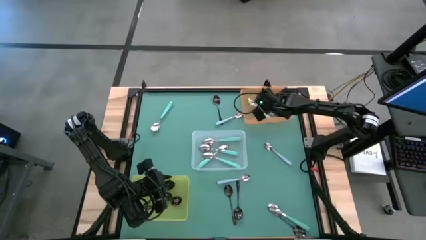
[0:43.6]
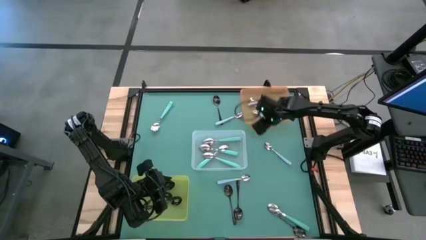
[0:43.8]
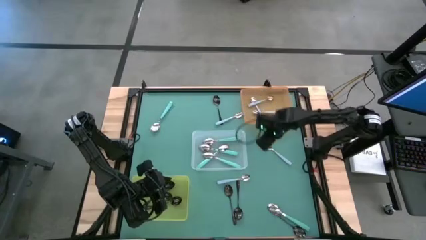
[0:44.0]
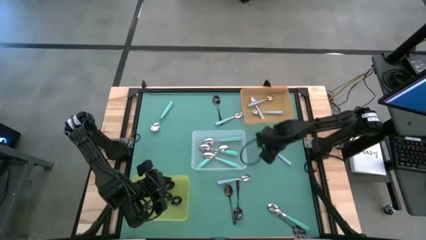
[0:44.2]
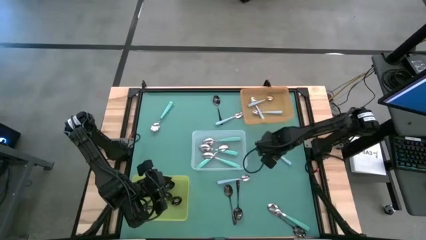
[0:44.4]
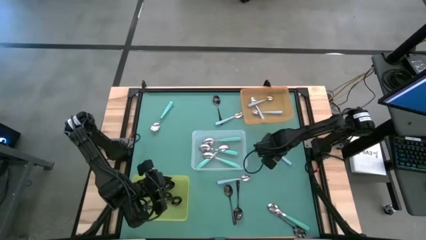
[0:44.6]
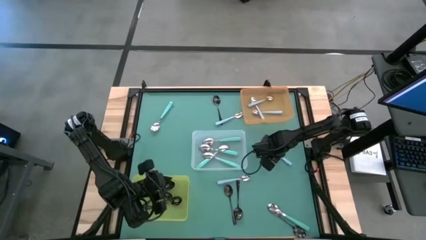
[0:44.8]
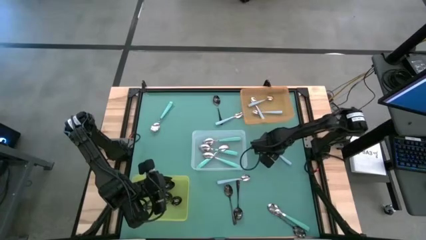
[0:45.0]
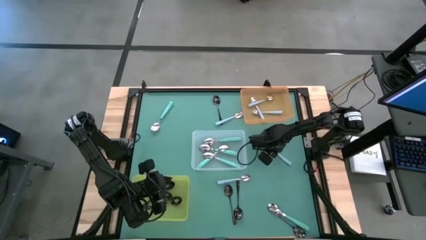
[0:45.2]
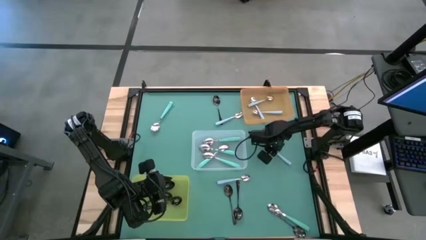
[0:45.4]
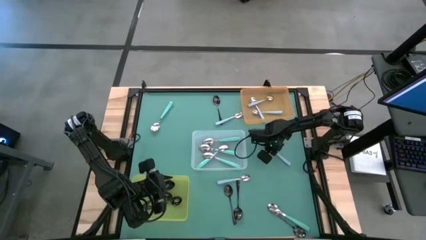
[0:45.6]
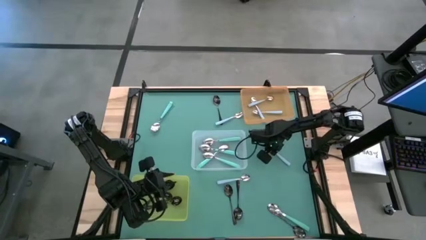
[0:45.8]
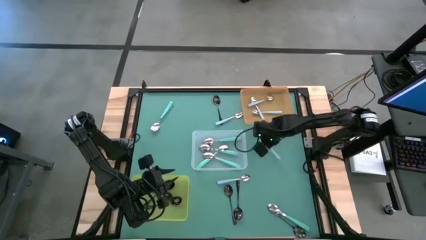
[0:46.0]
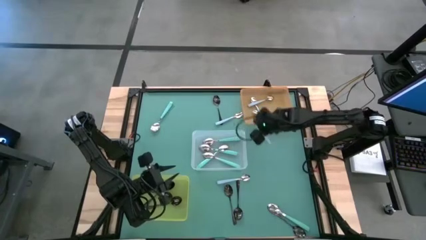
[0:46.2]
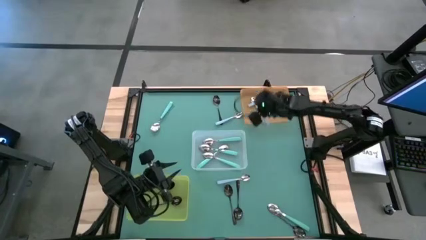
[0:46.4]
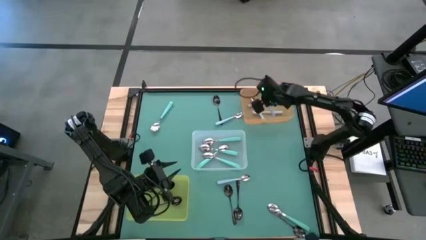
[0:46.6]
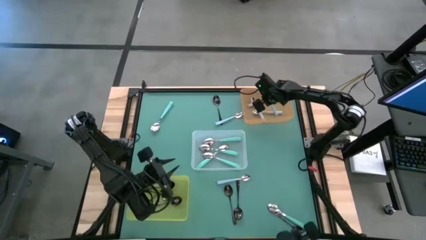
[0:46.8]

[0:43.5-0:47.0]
Task: Sort silverware by color (type)
Put the purple spoon into the orange bin

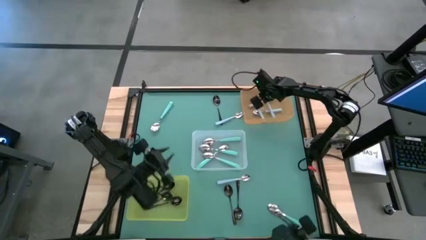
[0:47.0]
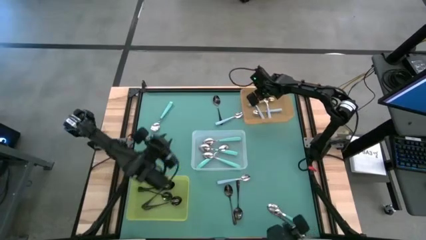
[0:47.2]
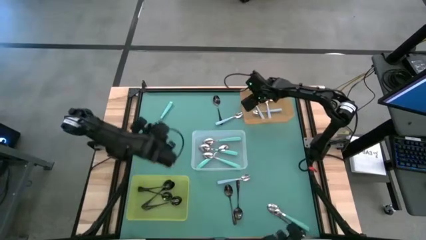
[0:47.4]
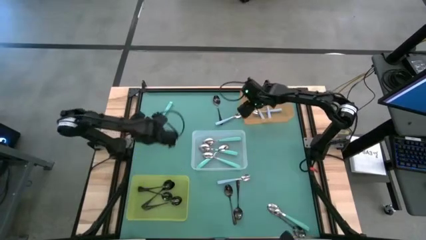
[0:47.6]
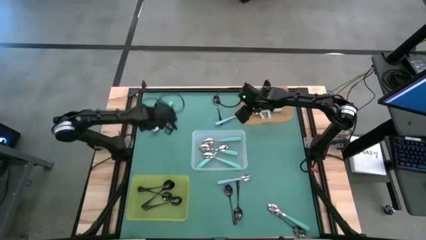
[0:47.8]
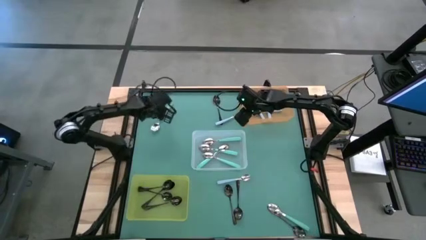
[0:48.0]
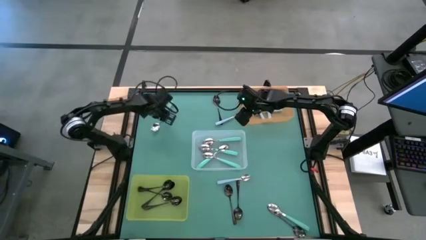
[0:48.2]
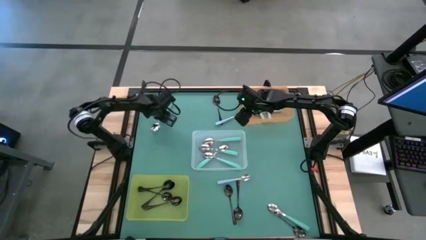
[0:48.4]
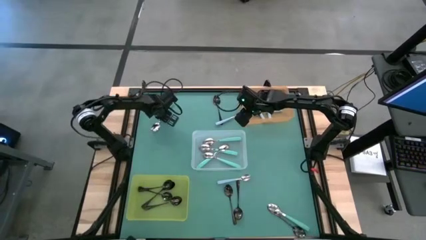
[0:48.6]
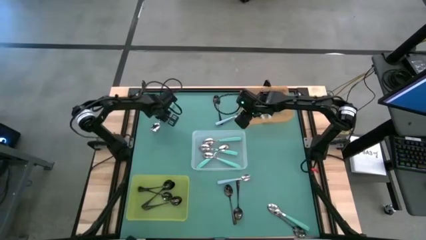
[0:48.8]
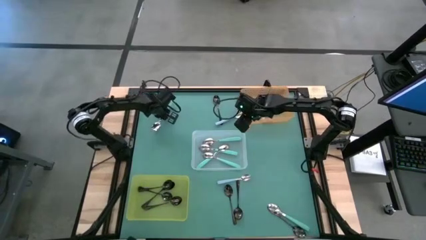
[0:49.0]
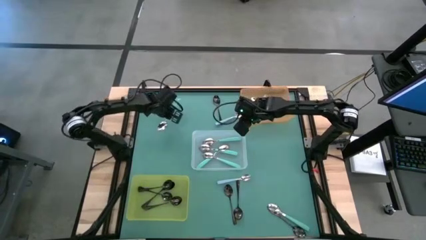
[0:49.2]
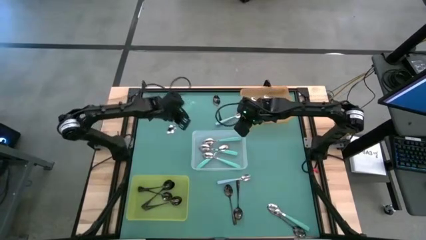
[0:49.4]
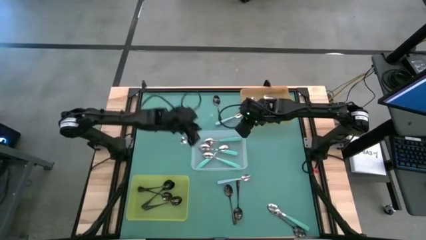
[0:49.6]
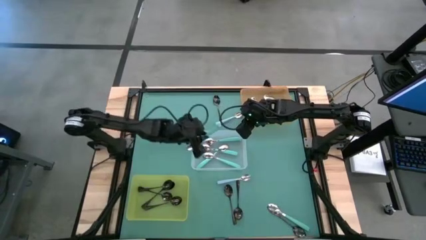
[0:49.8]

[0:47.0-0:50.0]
Put the green spoon into the transparent bin

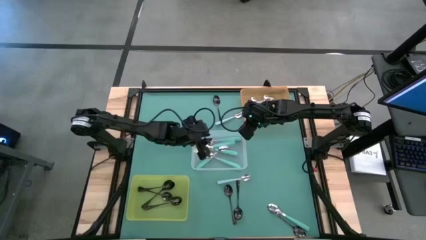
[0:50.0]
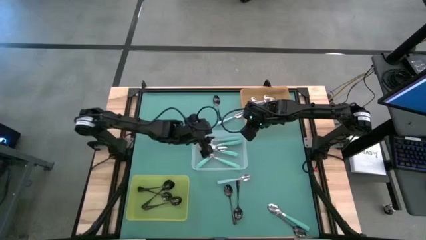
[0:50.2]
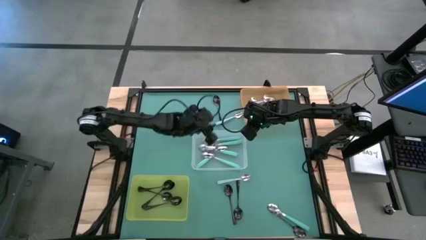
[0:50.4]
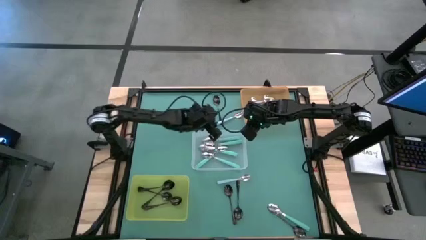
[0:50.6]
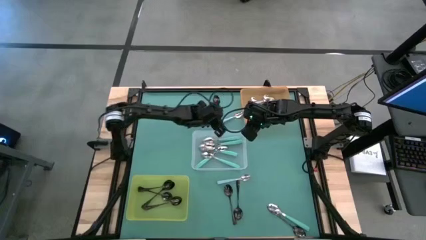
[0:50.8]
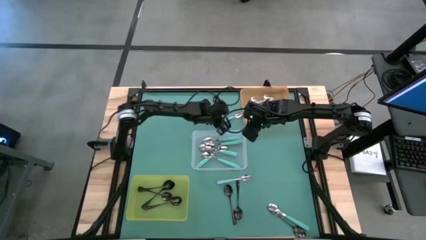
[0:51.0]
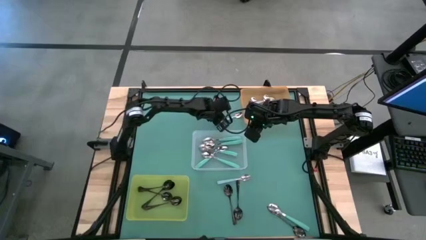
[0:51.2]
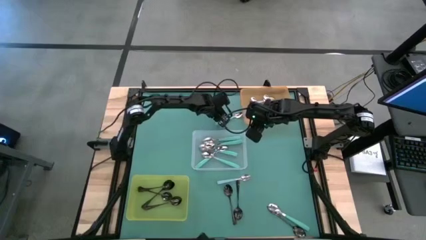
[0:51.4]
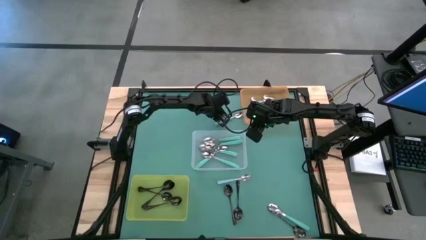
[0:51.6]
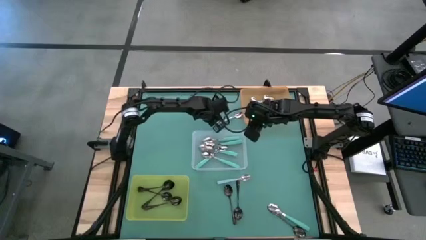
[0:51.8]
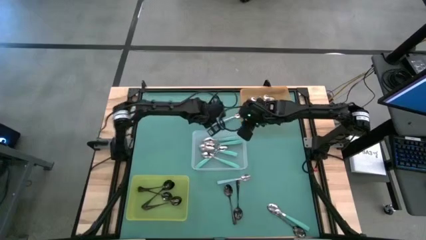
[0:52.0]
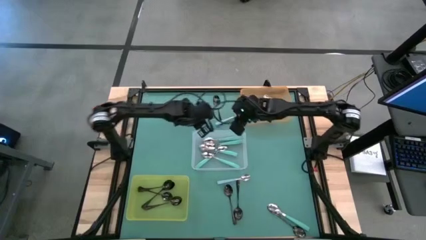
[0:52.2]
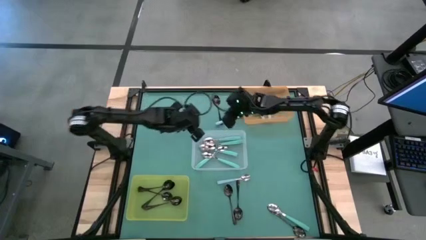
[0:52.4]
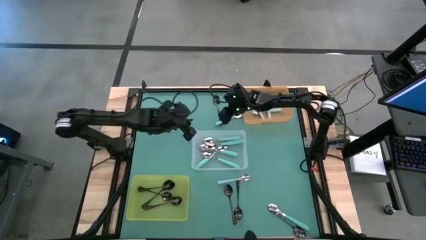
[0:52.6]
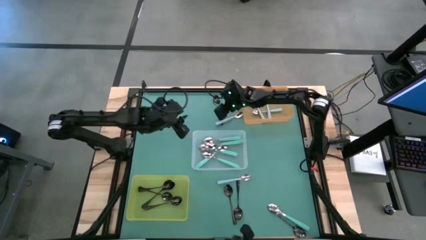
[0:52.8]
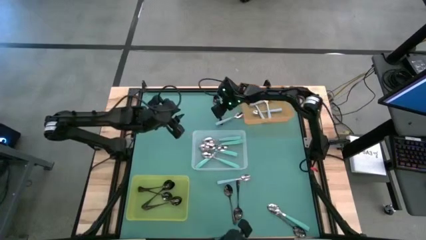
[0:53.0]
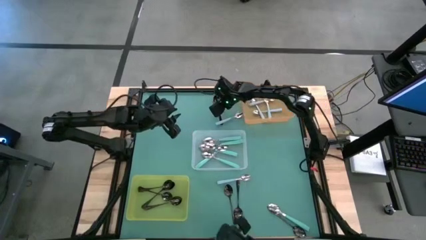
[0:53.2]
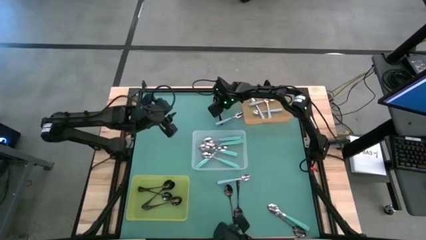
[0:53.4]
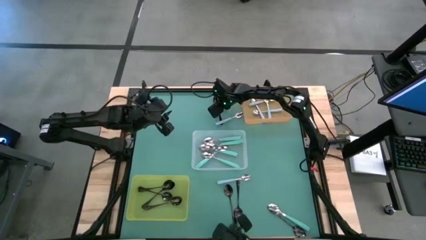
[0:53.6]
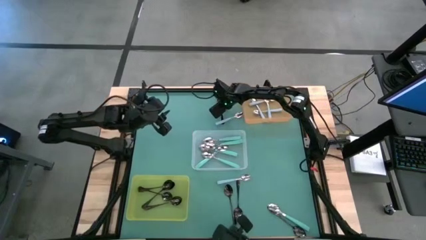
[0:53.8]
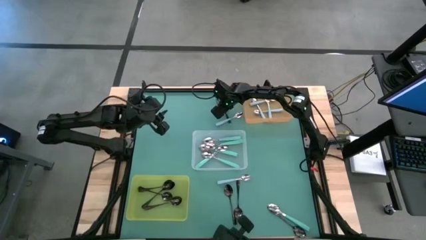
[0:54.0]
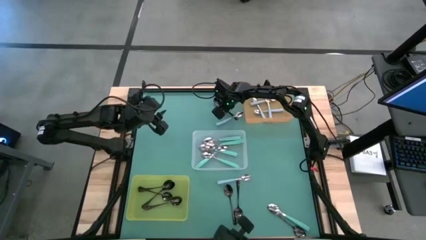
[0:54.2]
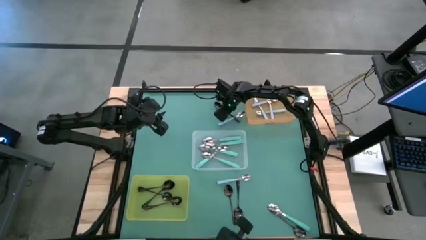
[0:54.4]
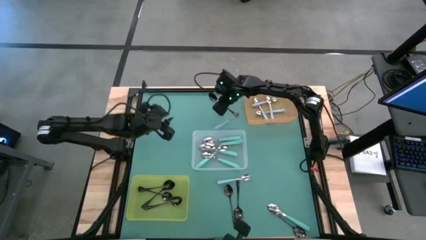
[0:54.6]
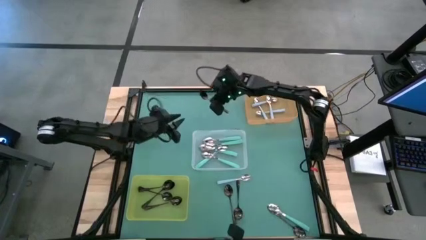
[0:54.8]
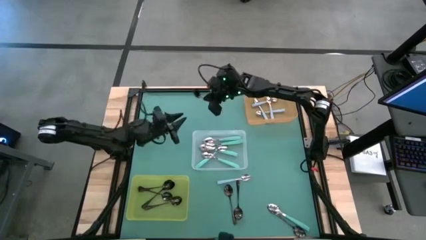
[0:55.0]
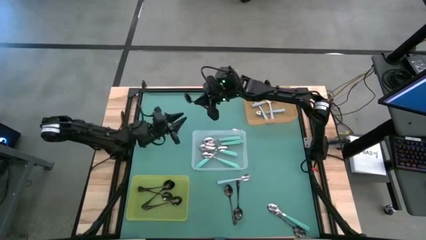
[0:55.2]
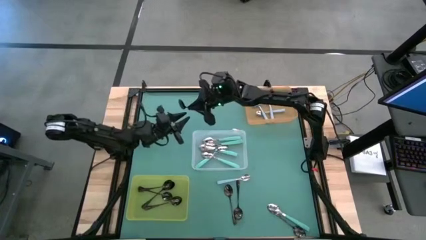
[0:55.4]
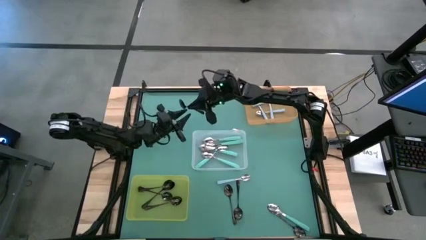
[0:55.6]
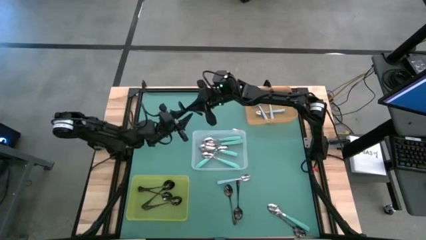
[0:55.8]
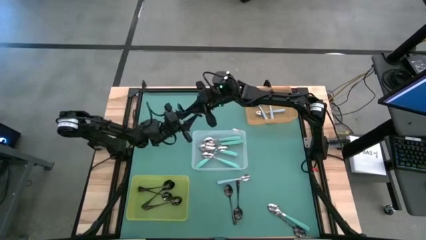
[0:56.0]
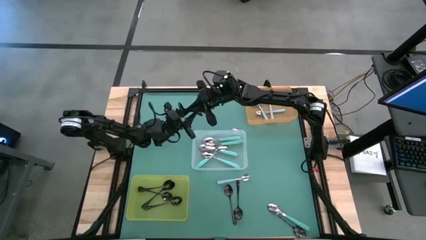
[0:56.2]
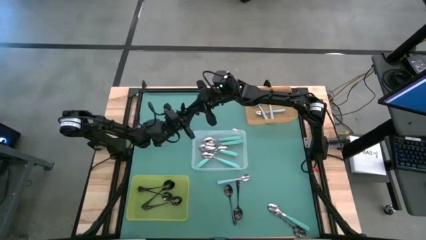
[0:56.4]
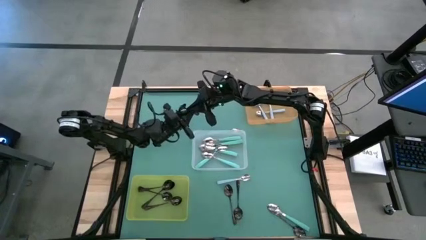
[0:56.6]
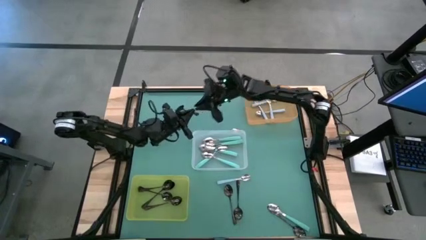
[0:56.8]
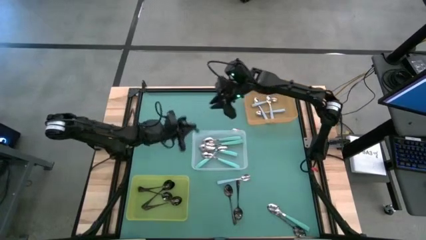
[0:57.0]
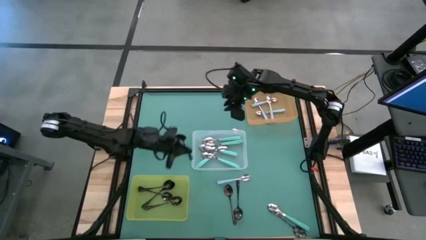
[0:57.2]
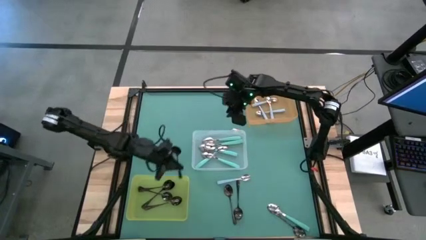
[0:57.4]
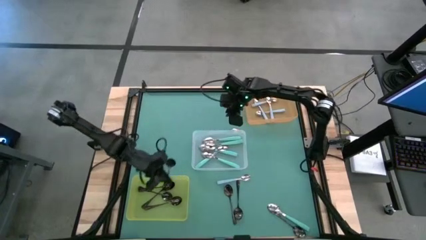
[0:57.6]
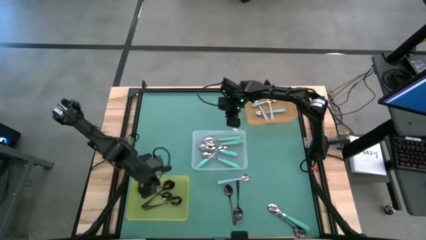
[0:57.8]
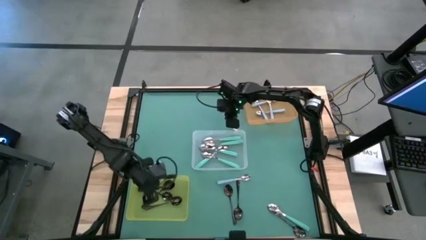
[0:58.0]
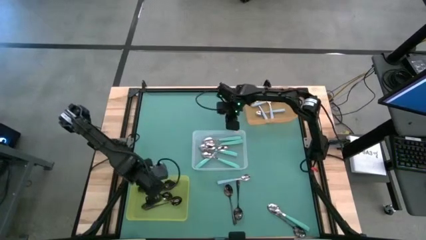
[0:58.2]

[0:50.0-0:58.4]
Put the black spoon into the yellow bin

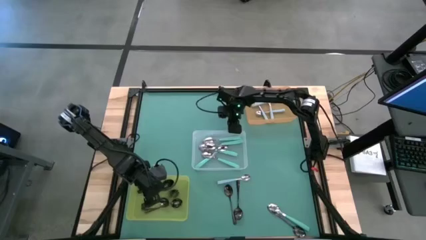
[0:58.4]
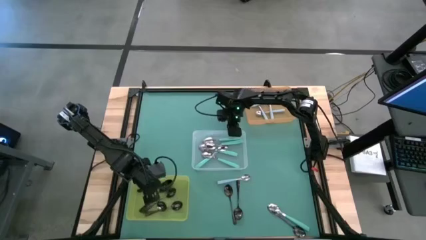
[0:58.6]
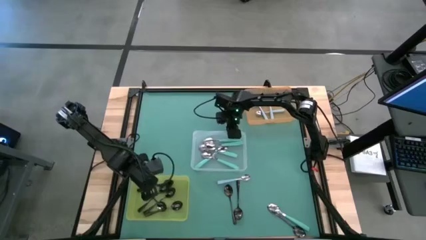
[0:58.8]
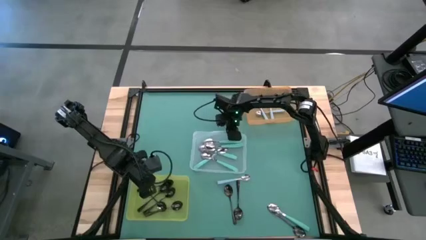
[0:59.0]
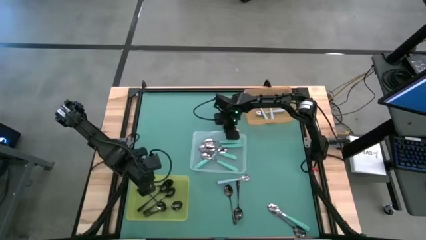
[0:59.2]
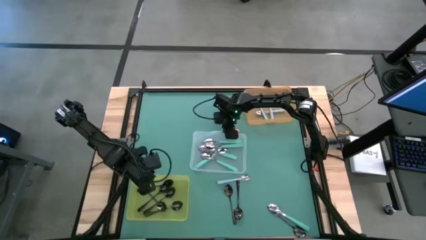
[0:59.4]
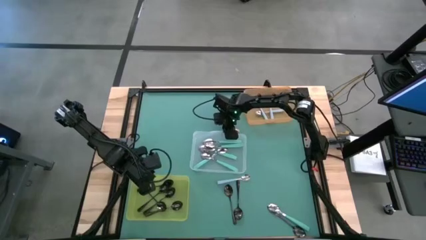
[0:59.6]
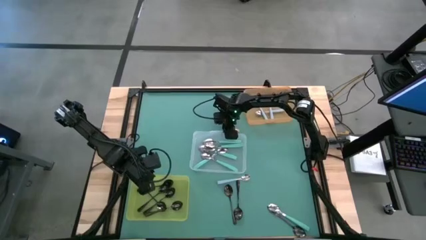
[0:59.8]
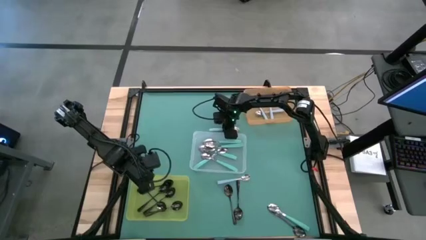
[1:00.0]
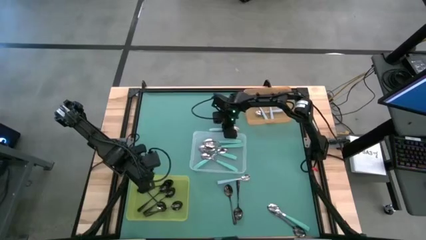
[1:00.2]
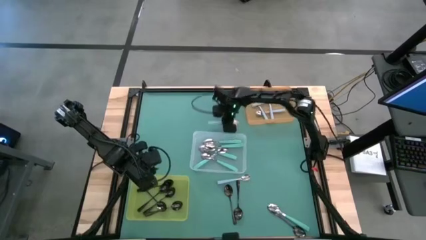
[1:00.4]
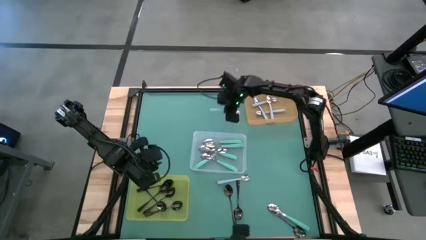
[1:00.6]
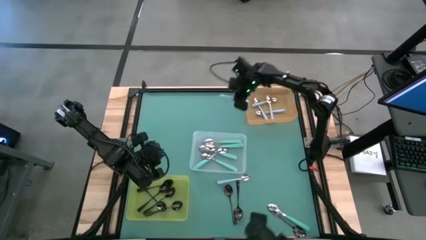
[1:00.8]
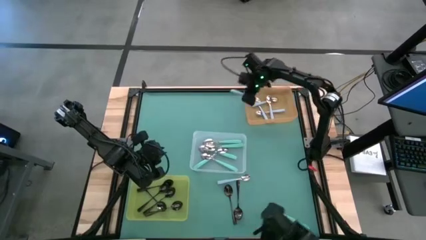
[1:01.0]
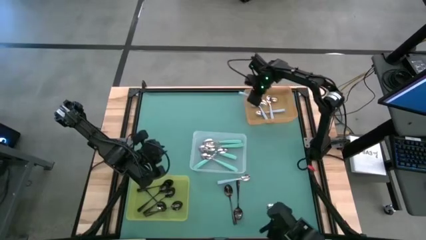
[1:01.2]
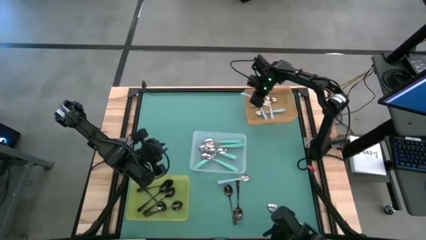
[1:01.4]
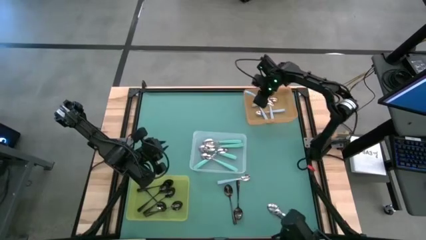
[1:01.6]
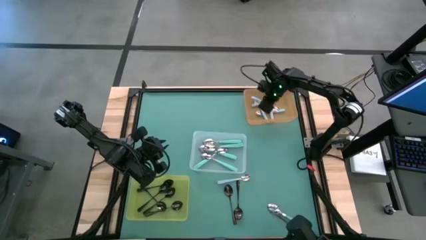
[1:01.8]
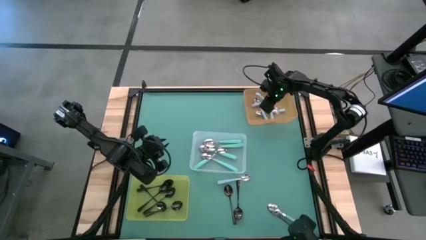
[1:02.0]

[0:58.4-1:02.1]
Put the purple spoon into the orange bin
